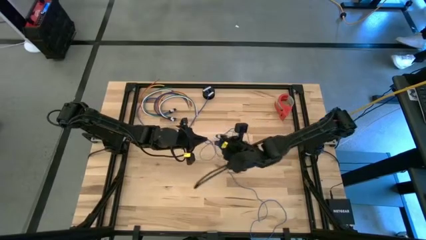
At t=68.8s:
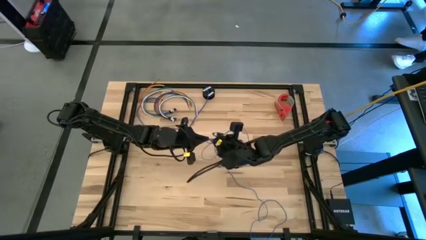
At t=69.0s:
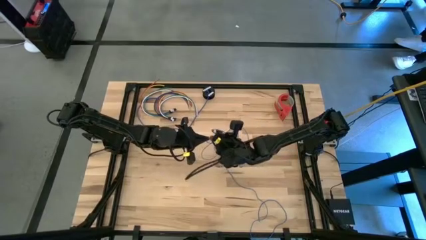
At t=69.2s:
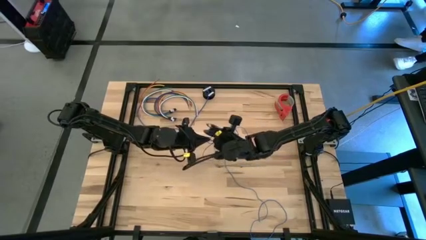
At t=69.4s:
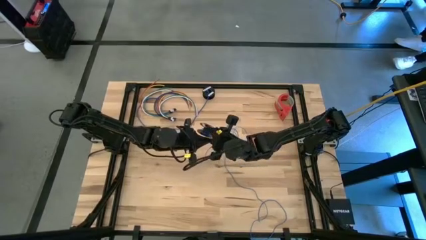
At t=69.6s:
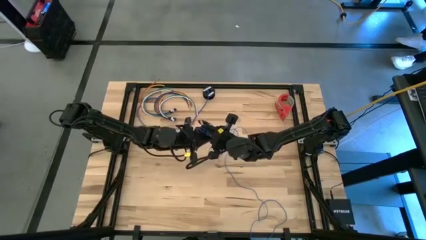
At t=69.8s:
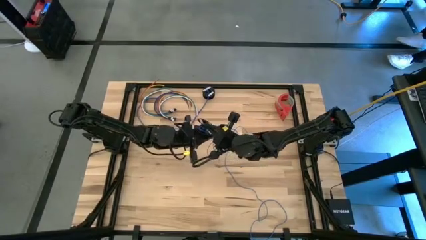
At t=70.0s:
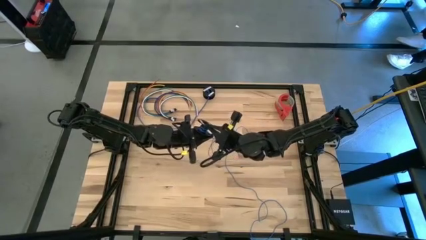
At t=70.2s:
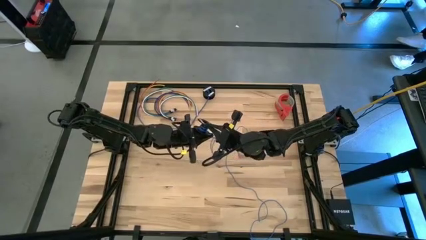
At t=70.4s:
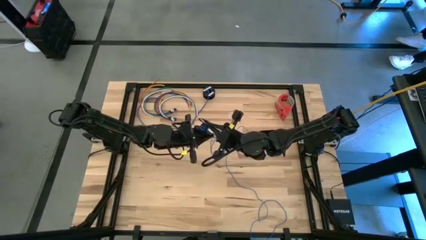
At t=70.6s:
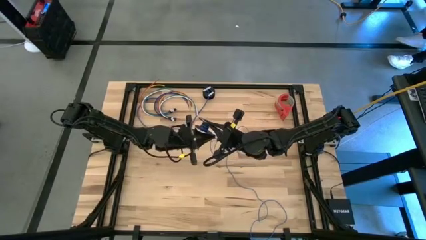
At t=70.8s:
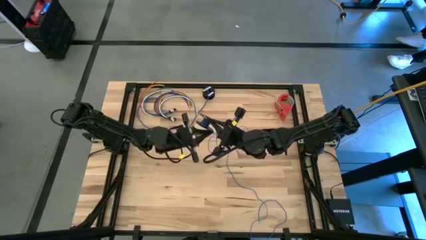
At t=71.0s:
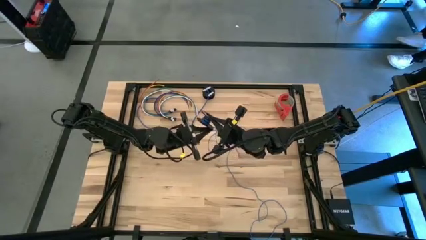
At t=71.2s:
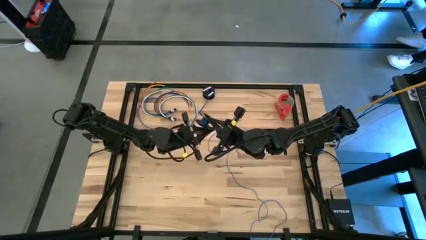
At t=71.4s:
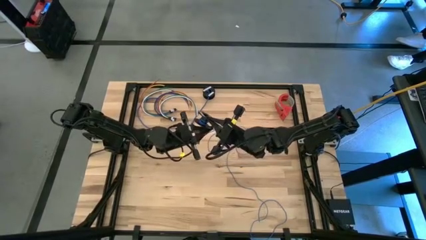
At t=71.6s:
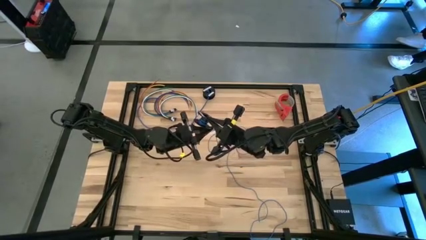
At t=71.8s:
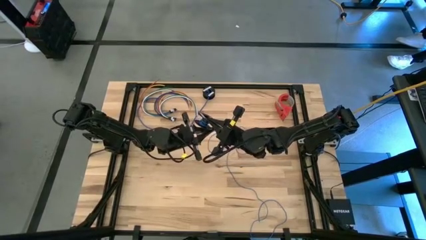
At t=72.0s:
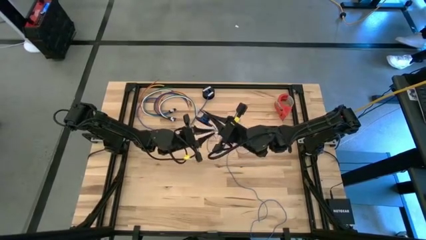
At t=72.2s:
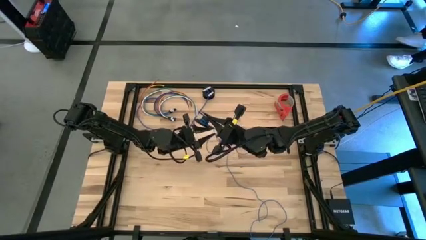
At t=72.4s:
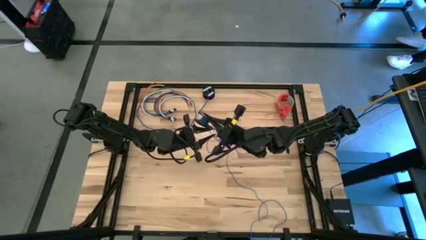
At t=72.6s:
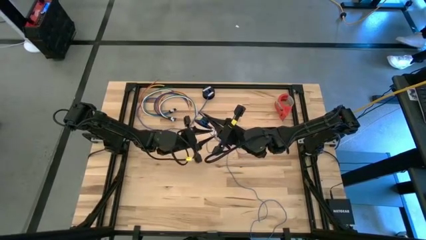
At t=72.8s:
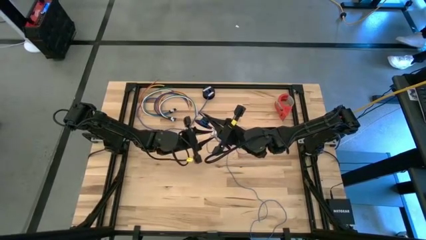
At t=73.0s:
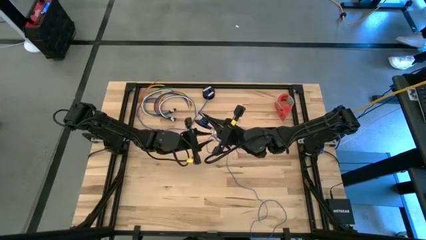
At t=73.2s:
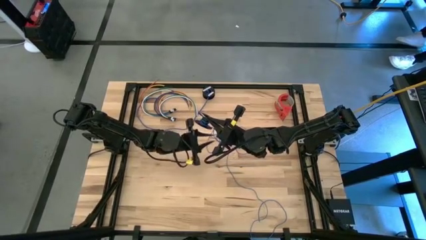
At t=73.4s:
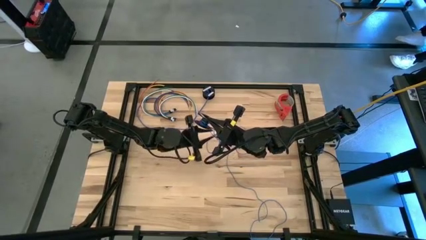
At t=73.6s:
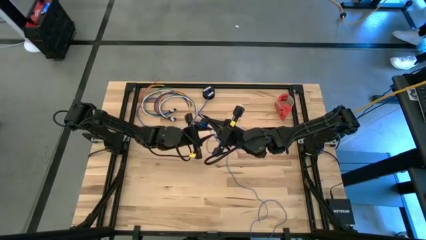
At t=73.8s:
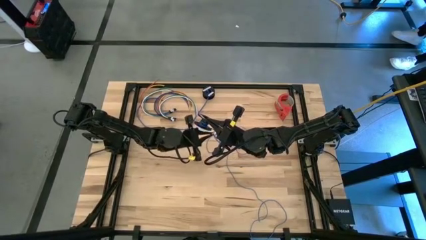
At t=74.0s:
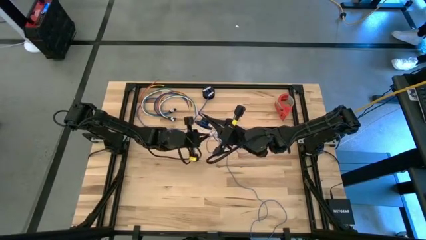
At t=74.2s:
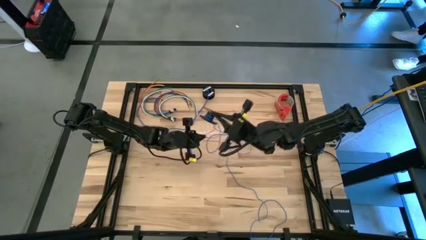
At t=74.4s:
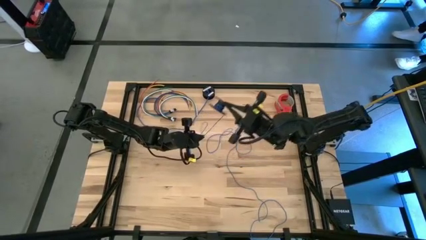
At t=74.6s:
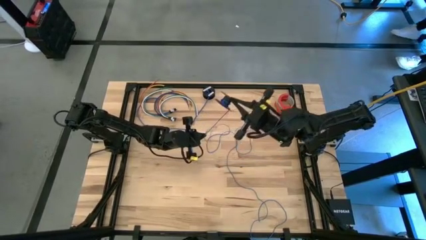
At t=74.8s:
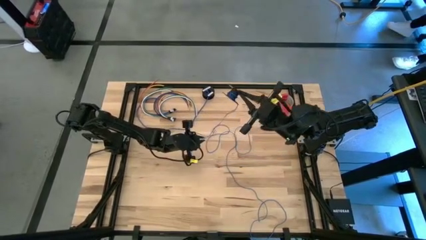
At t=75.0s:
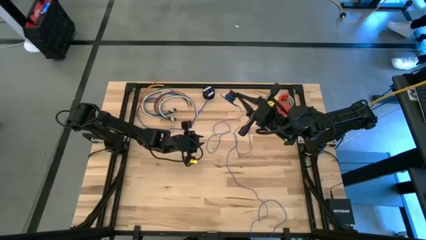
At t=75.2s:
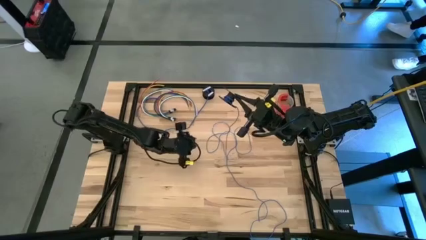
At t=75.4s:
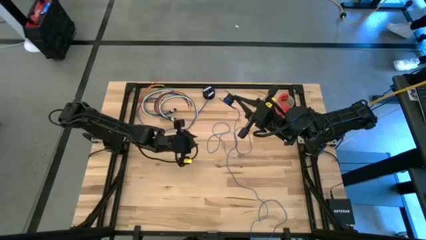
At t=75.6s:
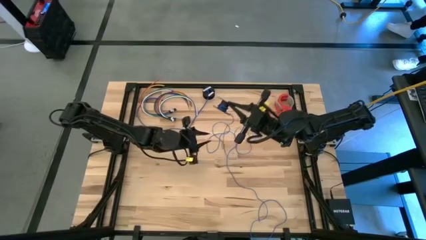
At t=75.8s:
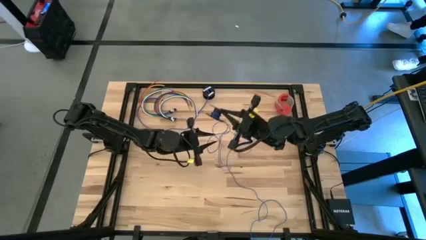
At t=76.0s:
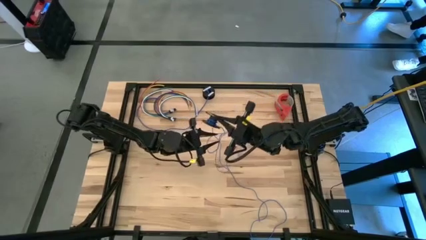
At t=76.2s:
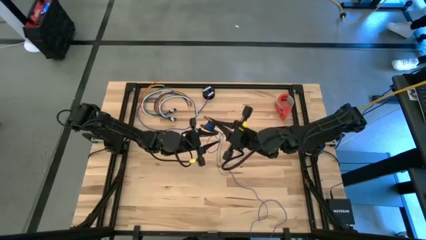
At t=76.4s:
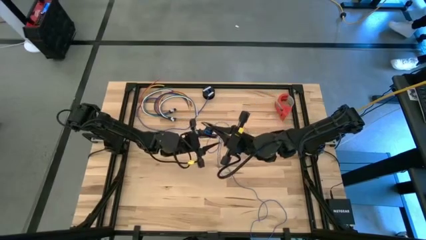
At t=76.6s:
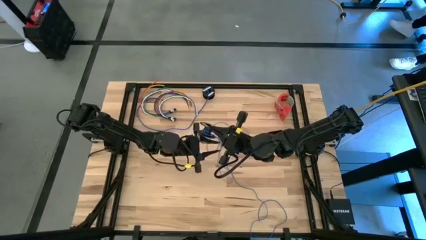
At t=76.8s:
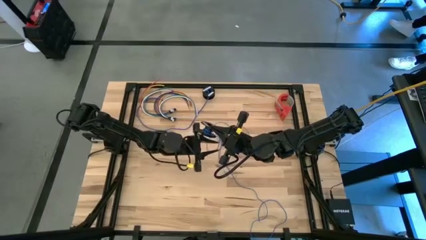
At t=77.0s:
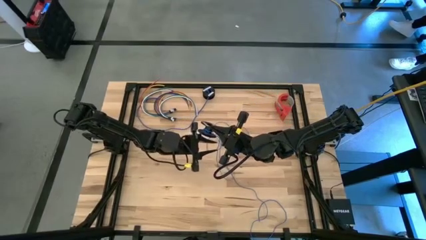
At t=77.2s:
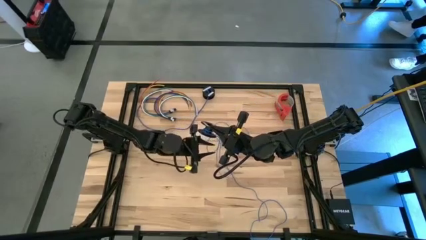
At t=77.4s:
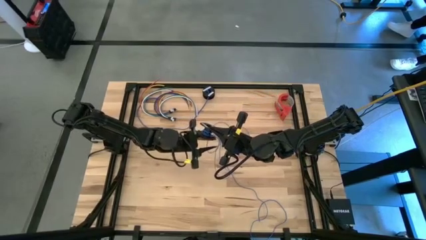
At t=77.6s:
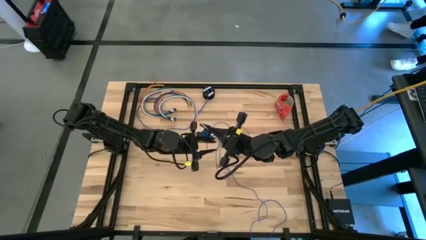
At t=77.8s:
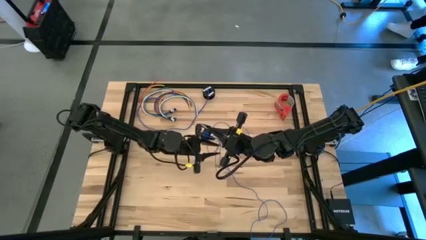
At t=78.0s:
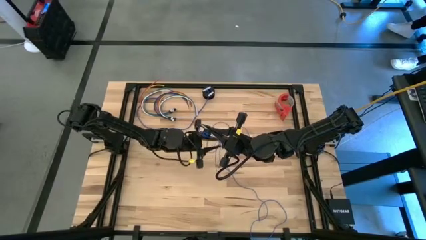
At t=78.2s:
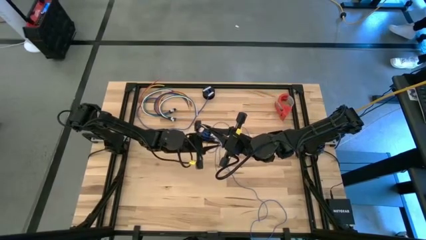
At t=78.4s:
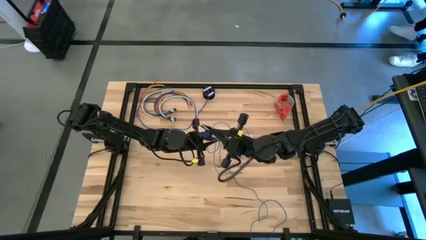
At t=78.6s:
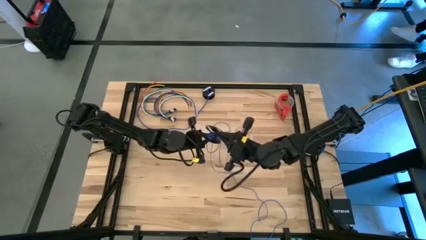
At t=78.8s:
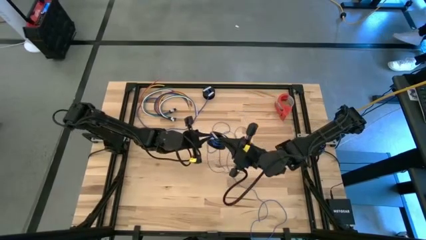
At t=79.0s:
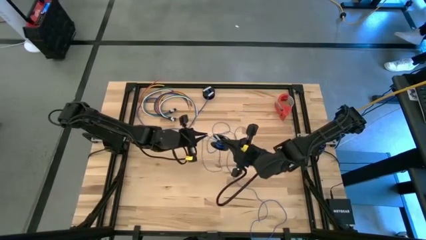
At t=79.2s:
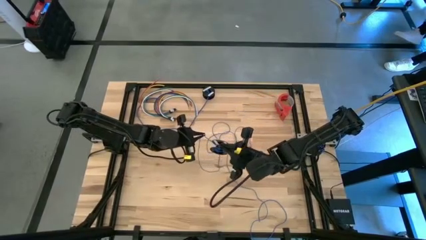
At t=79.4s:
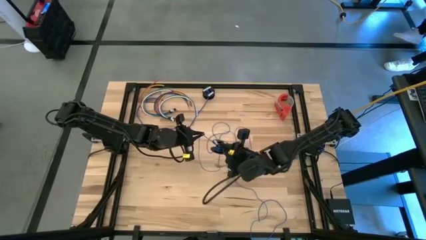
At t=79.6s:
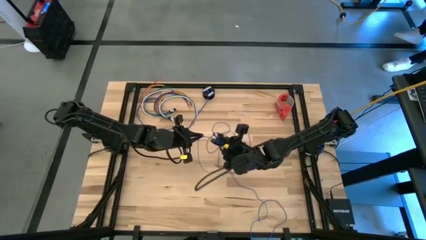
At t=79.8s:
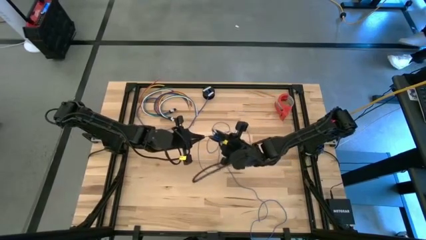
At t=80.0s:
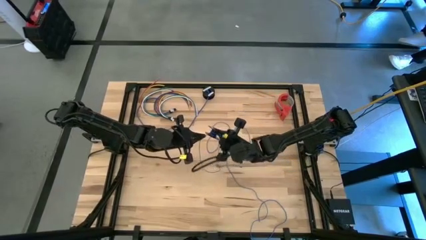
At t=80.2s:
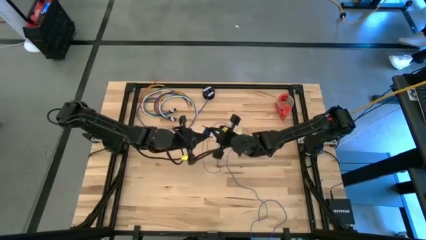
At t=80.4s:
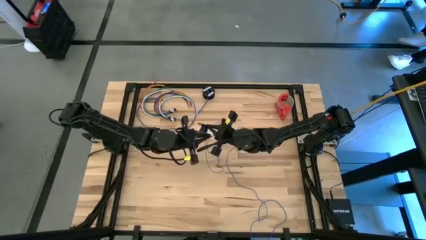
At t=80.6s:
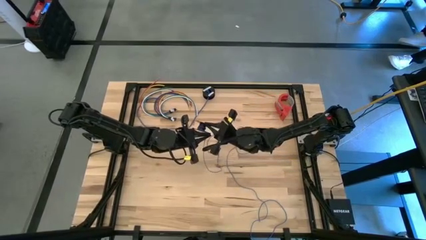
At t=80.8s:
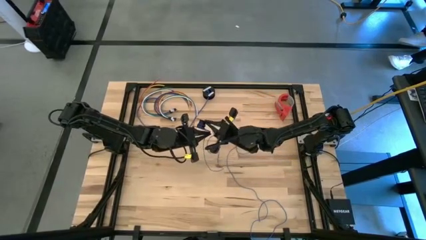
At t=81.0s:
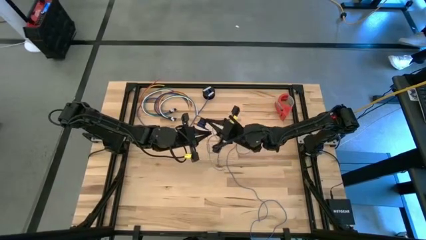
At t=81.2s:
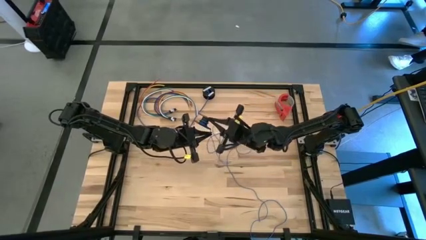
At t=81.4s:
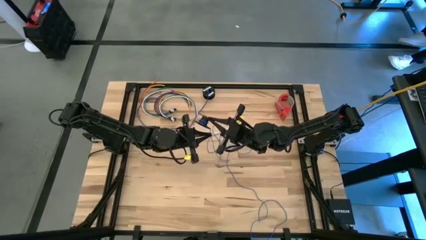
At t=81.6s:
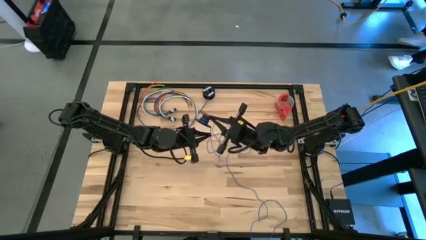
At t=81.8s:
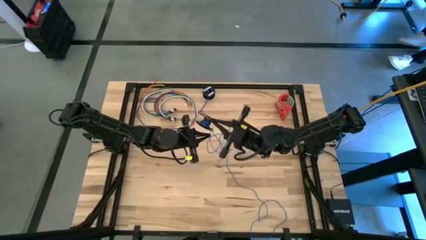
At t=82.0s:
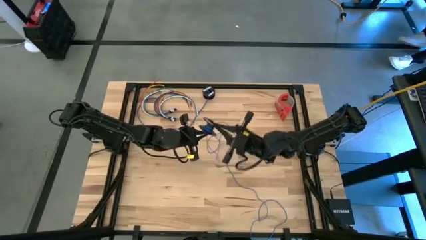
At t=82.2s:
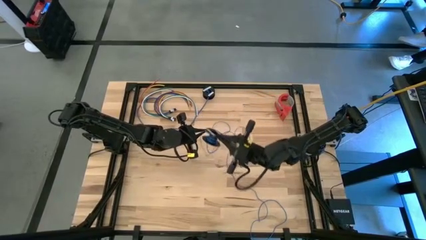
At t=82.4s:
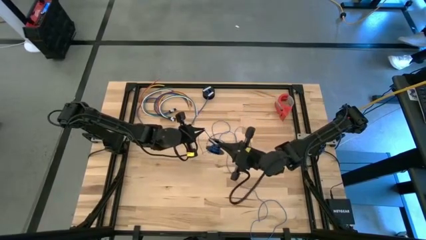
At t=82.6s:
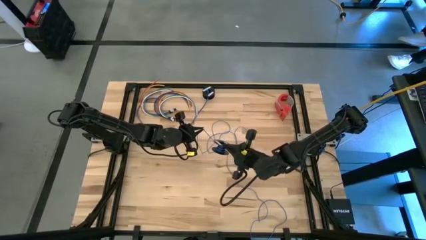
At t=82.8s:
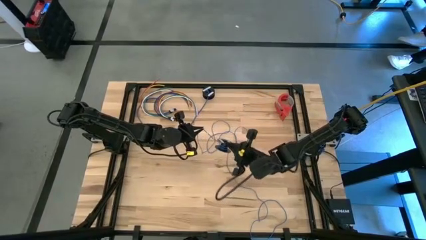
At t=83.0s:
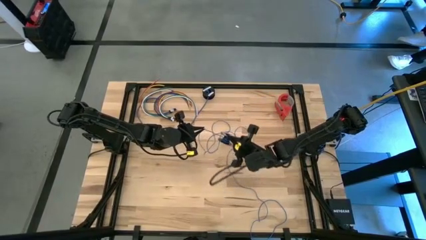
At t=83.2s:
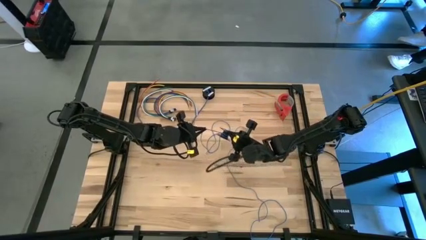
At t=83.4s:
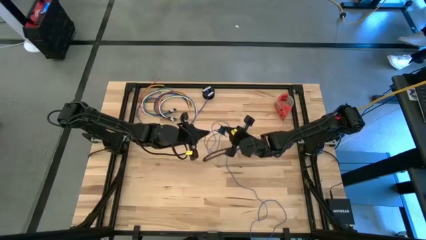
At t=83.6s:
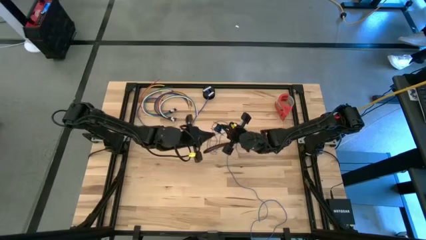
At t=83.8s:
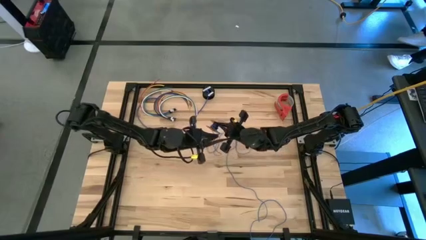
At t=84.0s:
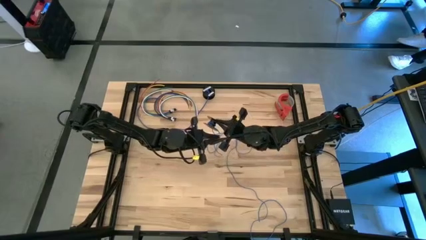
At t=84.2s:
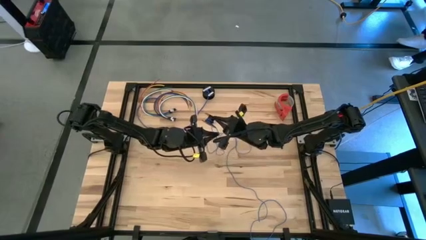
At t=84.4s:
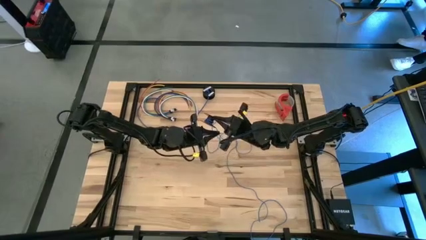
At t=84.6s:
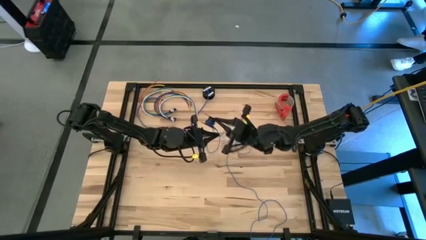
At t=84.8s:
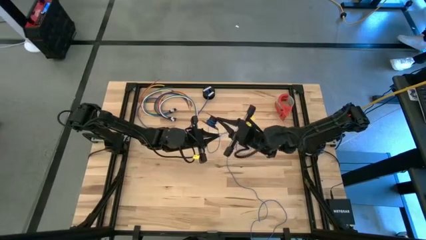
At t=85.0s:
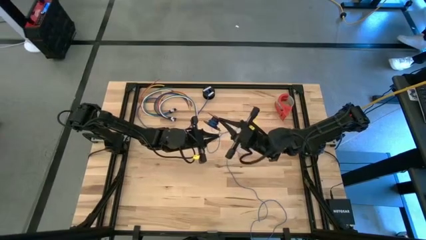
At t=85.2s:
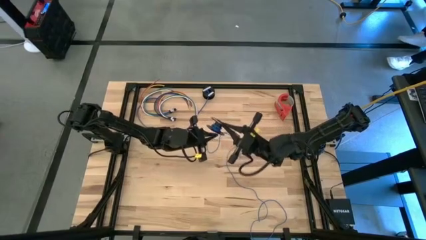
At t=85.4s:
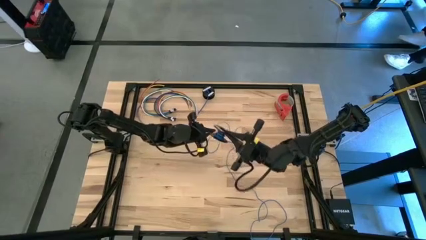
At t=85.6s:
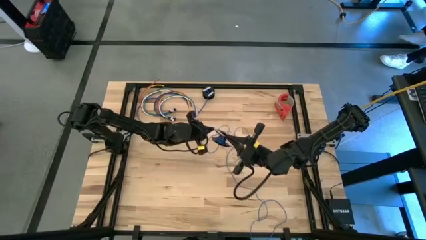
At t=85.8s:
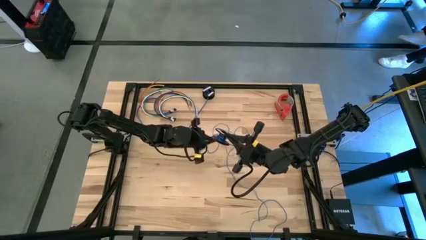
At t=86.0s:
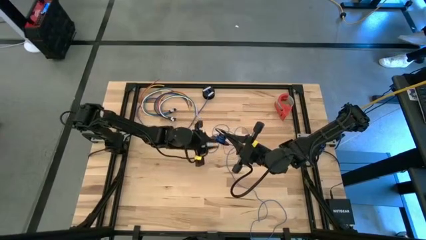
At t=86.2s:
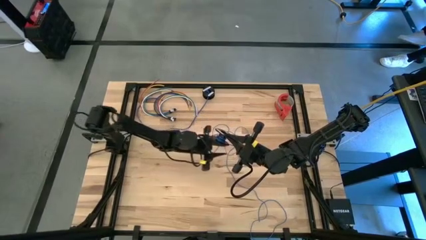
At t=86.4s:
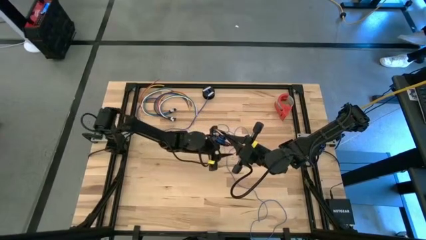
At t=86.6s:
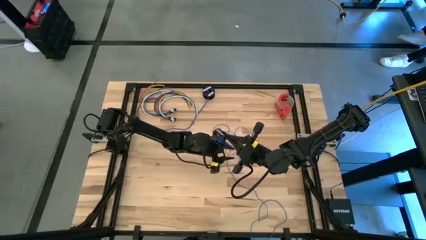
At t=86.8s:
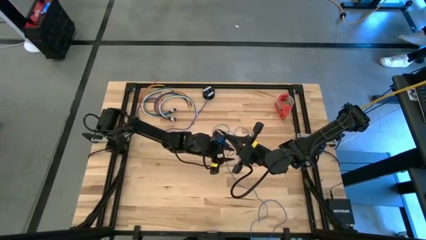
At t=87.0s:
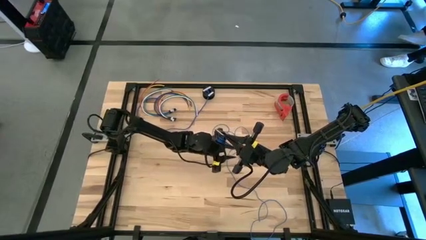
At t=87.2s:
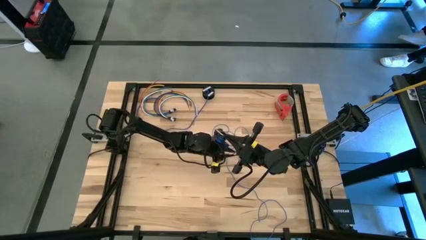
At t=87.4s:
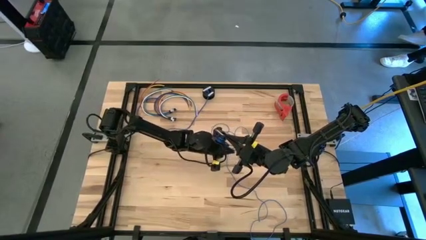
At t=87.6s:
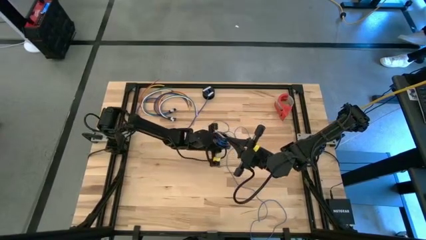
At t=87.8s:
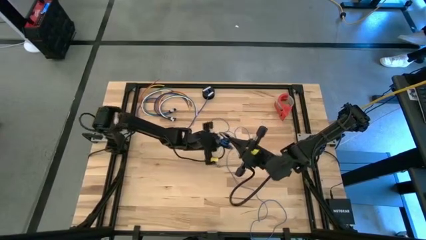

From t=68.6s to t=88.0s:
Task: Coil cords
Coil the blue wire onto the black spool
